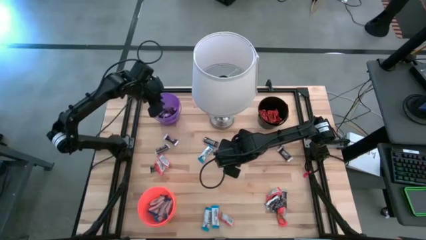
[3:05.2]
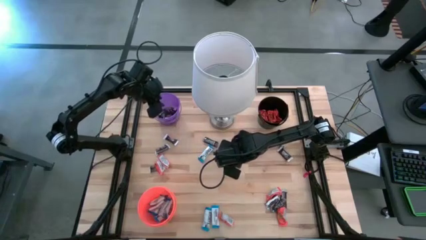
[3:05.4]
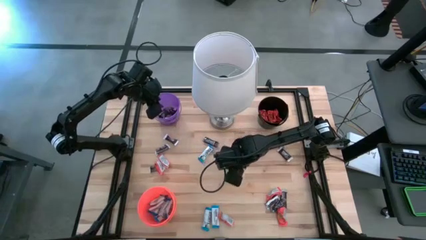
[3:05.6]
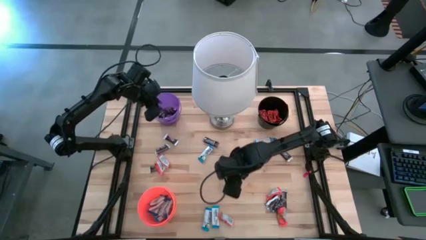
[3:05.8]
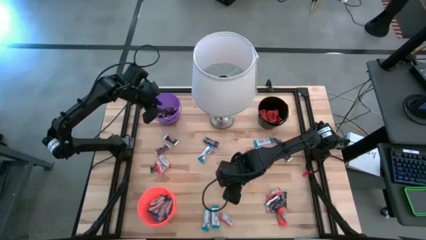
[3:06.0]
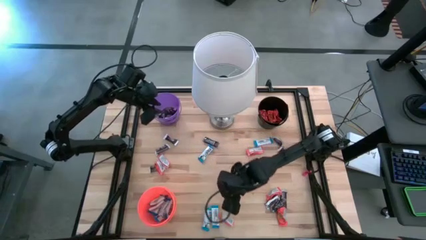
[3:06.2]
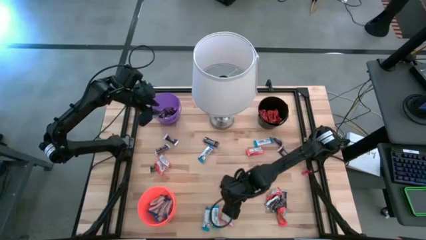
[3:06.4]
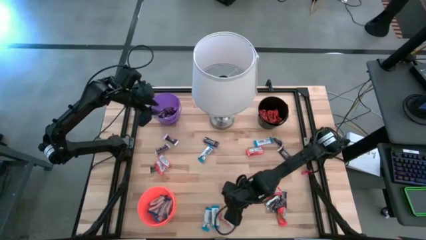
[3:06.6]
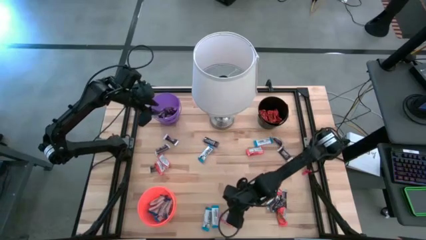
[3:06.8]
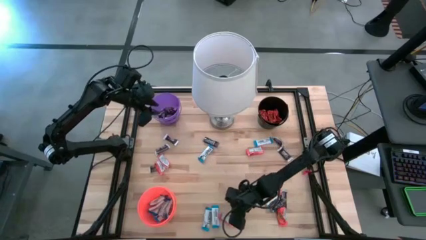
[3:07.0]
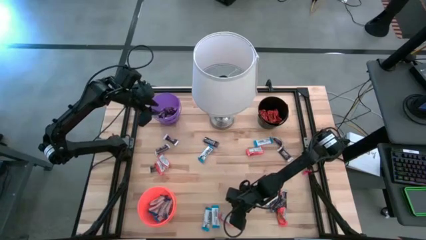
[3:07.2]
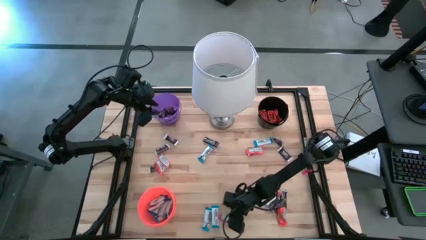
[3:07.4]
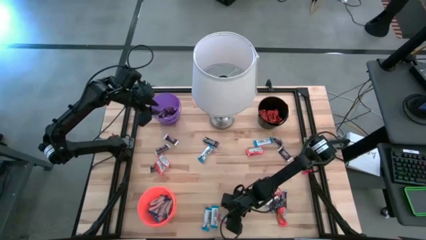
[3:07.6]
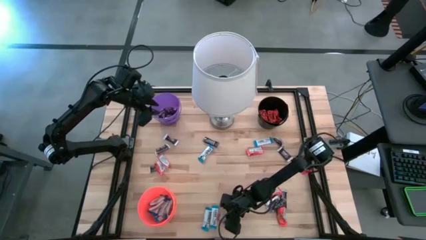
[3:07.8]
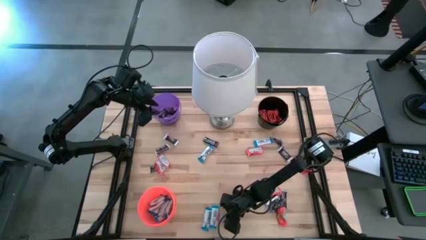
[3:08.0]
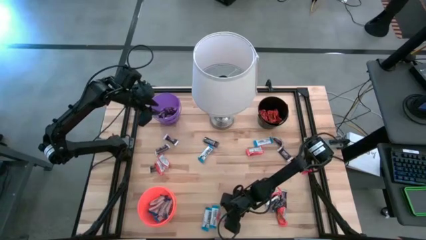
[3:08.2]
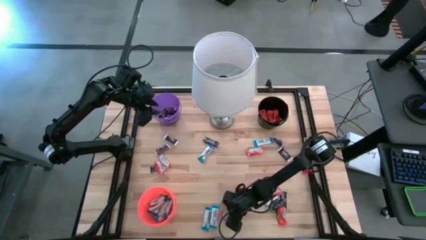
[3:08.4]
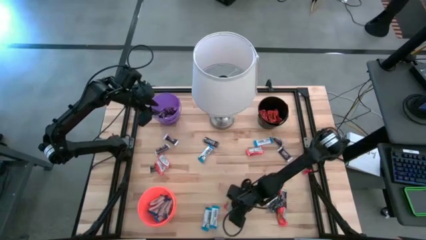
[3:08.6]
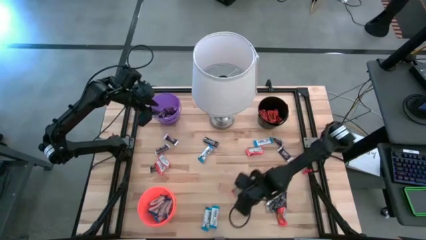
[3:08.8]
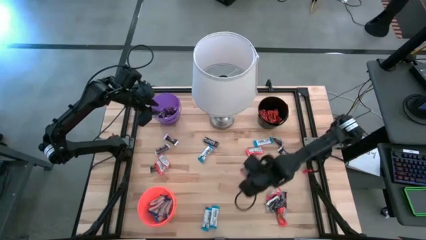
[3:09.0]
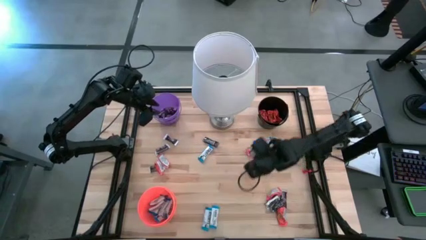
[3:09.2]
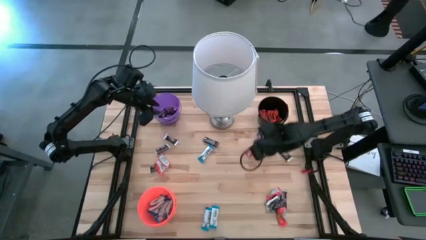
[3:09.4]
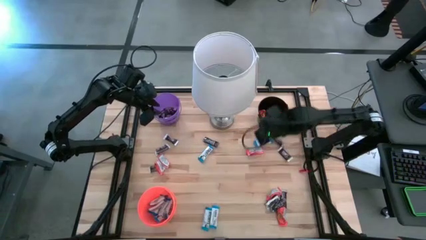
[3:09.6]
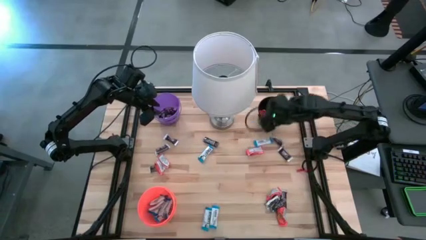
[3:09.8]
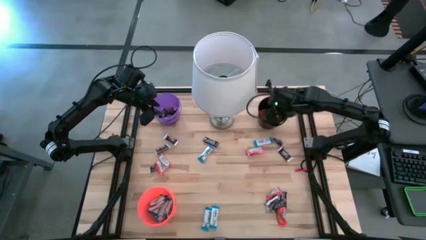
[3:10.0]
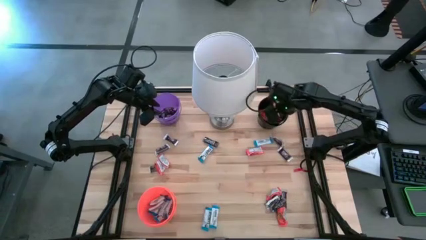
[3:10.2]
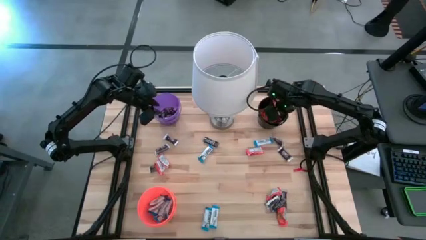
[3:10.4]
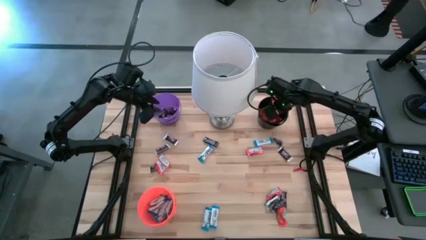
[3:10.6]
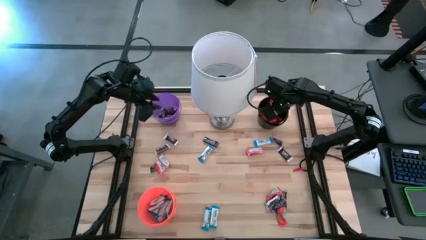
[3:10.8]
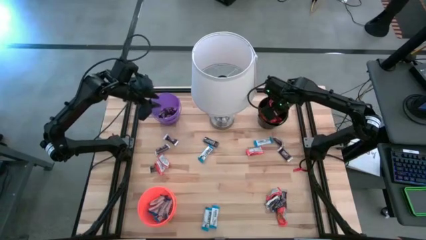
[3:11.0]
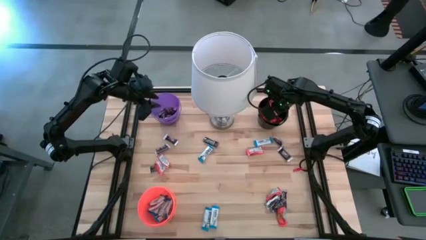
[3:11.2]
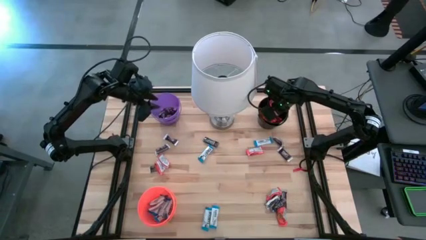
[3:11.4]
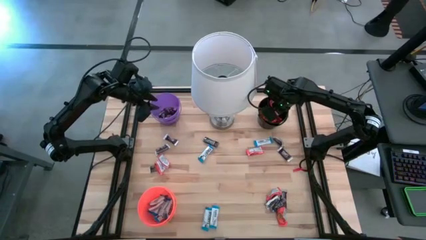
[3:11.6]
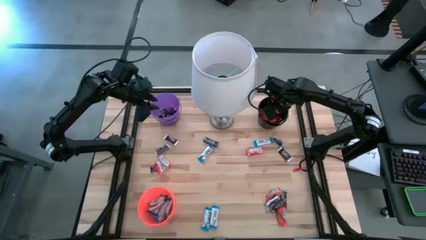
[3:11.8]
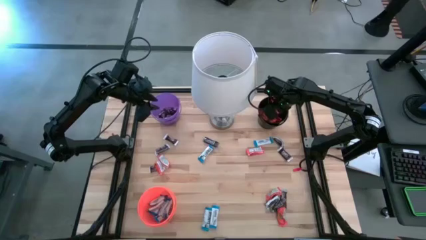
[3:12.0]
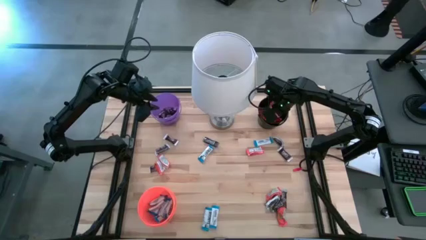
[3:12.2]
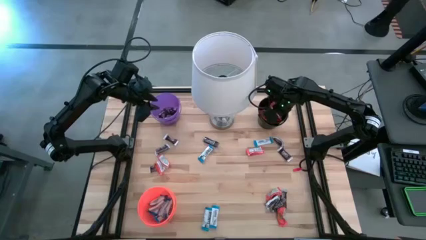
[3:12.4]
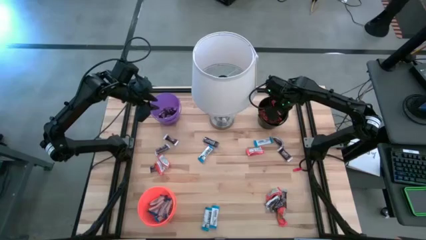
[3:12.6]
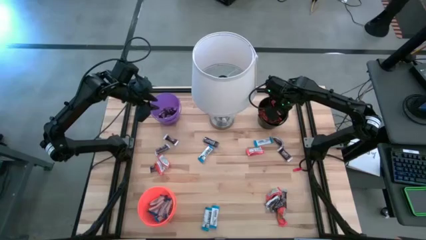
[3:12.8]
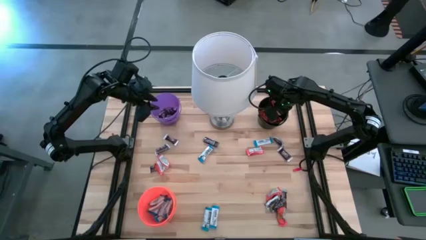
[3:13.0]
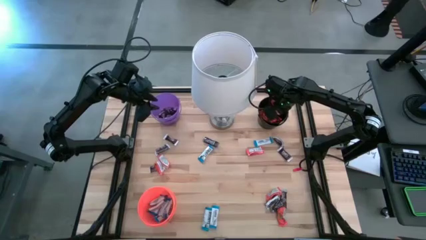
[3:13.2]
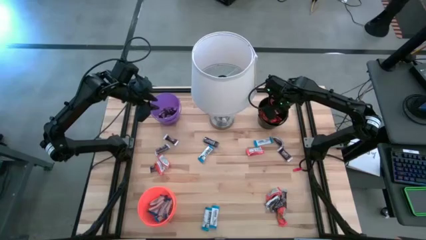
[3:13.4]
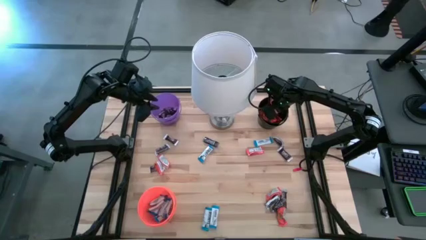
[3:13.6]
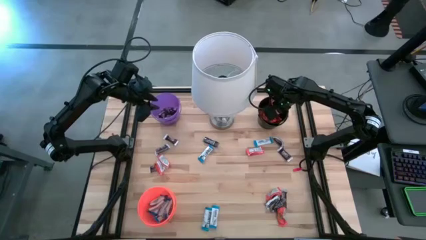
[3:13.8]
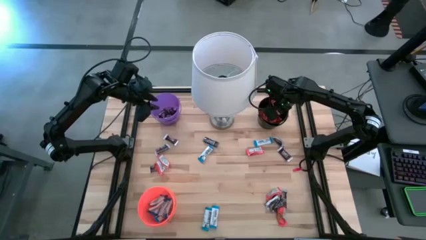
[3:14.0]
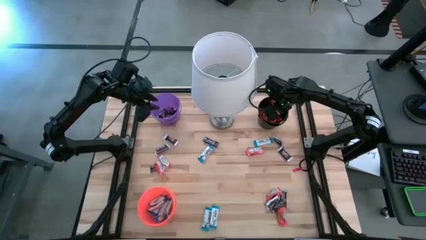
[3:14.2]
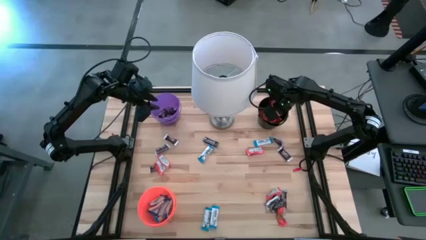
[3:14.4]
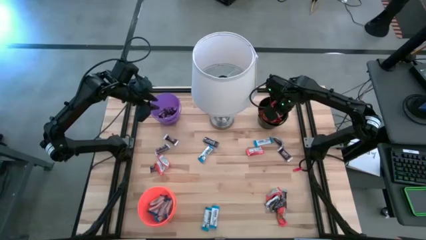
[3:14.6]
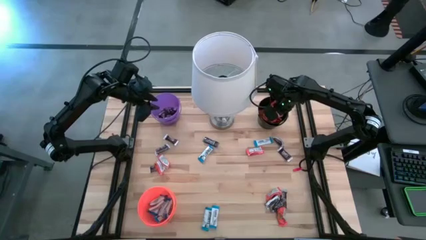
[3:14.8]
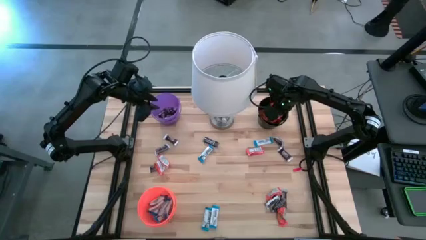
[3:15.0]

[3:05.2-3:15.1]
Task: Organize candy in baskets
Put the orange chocolate bar into the black bucket

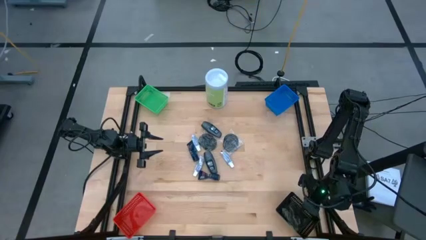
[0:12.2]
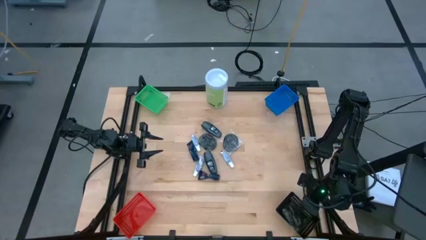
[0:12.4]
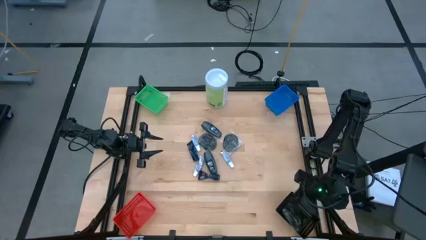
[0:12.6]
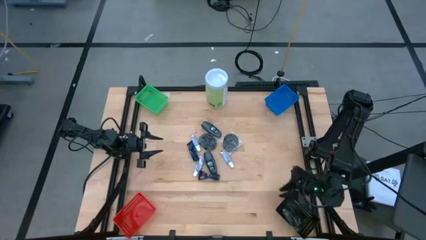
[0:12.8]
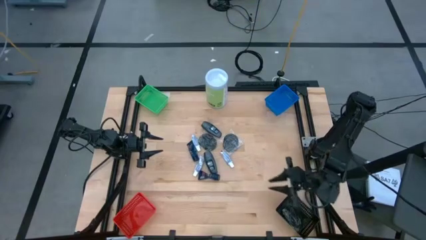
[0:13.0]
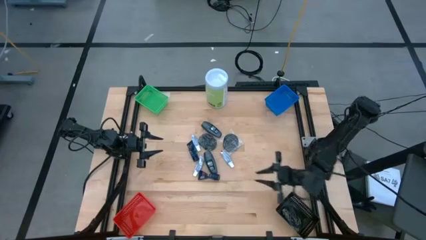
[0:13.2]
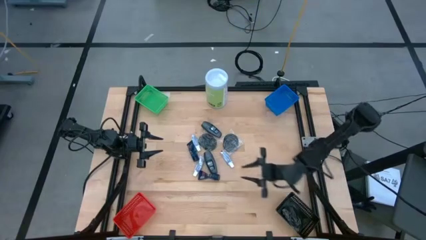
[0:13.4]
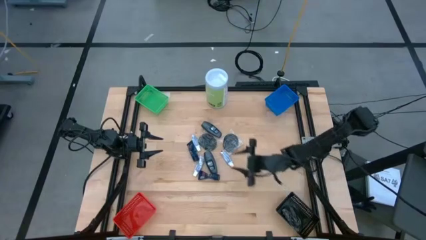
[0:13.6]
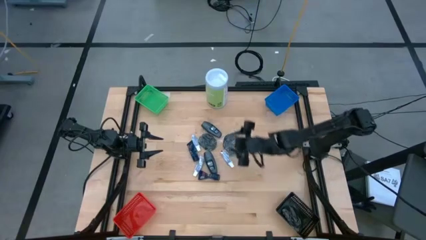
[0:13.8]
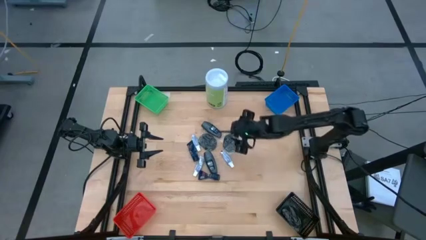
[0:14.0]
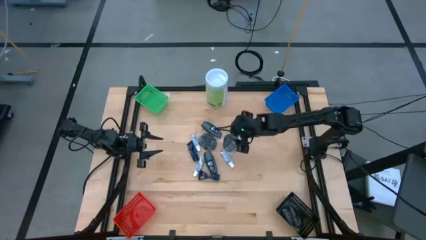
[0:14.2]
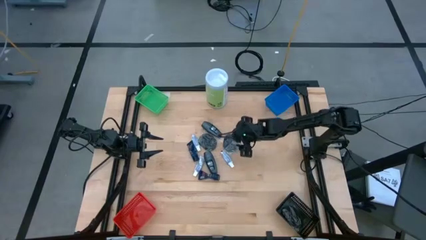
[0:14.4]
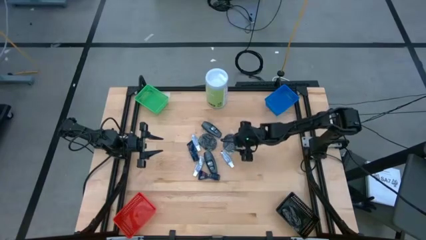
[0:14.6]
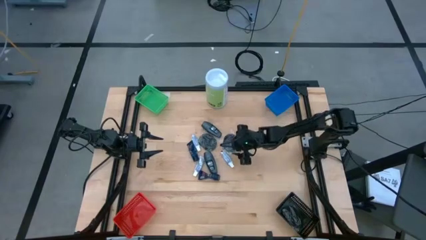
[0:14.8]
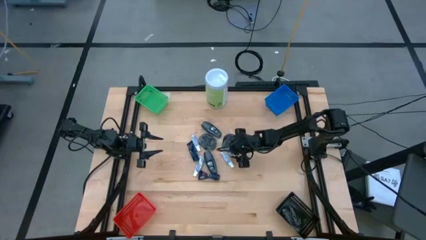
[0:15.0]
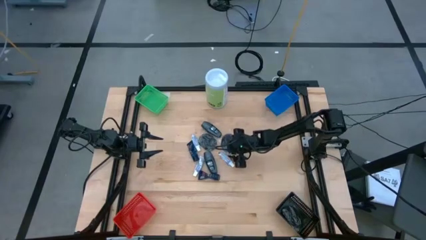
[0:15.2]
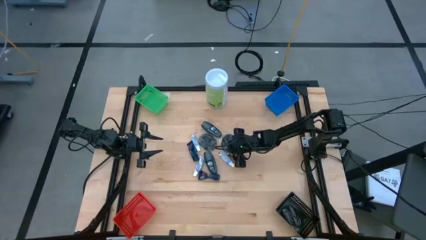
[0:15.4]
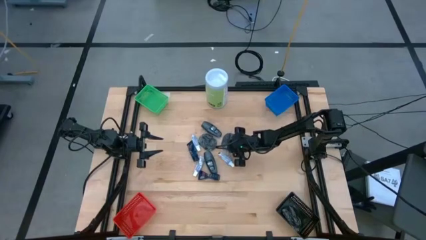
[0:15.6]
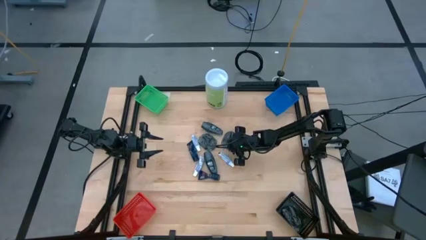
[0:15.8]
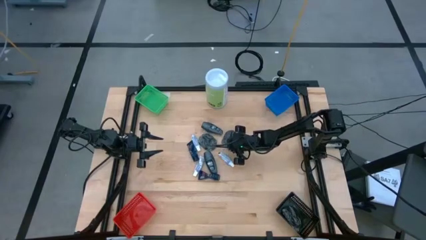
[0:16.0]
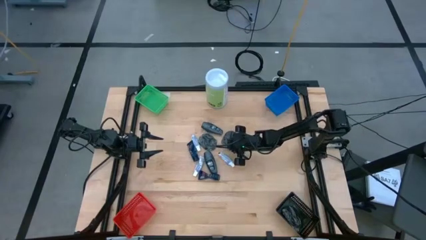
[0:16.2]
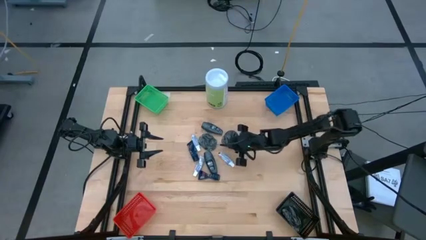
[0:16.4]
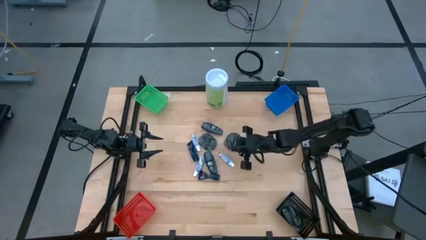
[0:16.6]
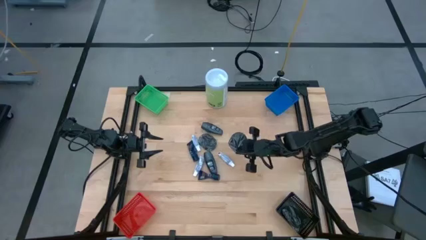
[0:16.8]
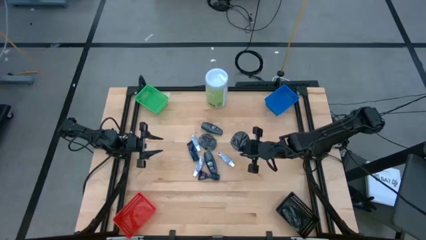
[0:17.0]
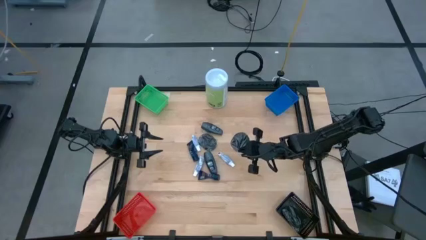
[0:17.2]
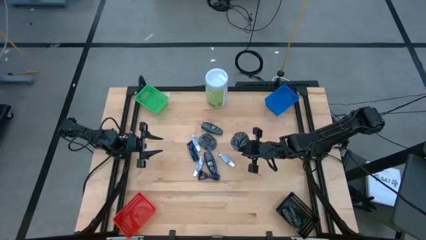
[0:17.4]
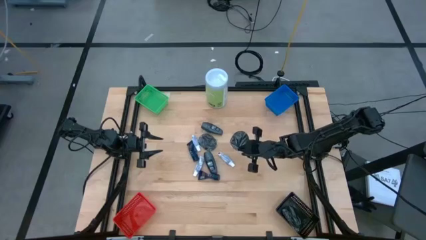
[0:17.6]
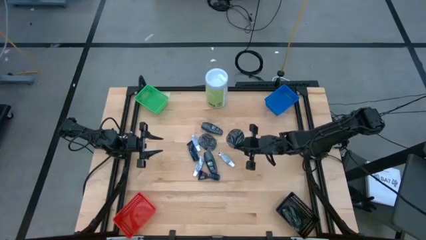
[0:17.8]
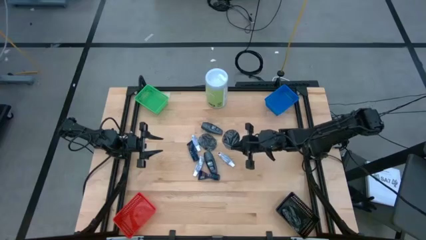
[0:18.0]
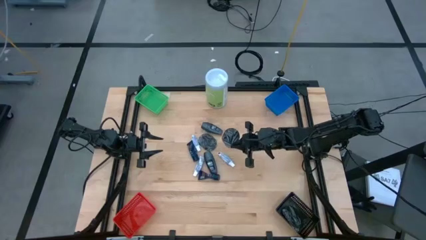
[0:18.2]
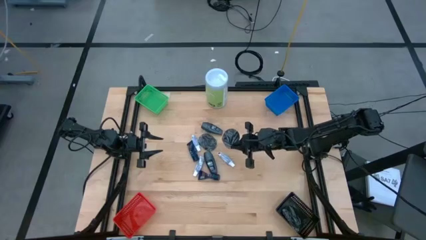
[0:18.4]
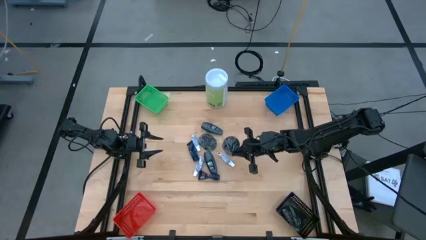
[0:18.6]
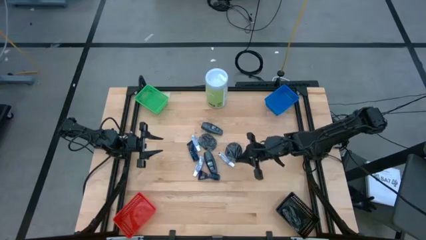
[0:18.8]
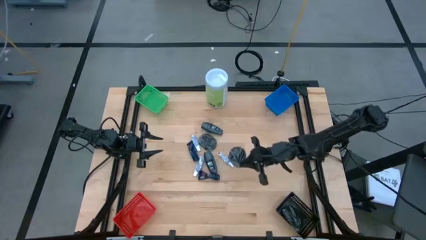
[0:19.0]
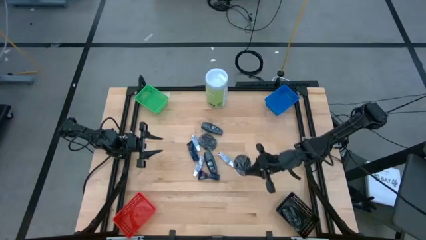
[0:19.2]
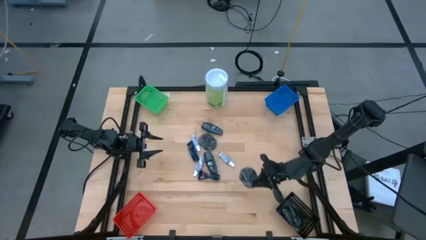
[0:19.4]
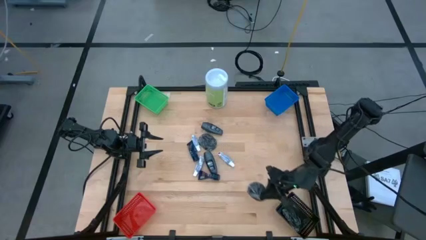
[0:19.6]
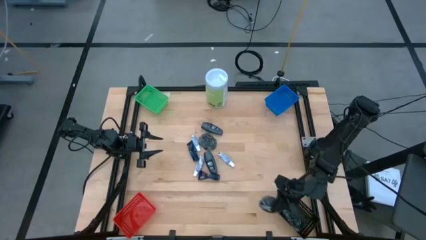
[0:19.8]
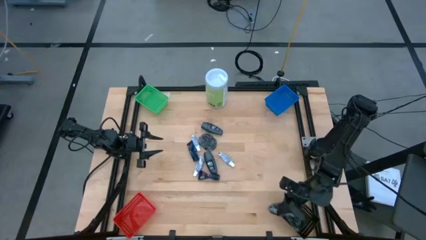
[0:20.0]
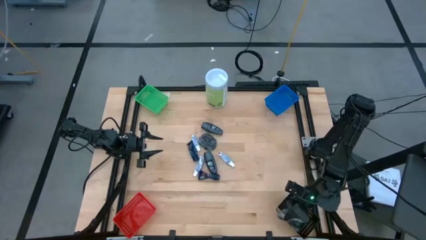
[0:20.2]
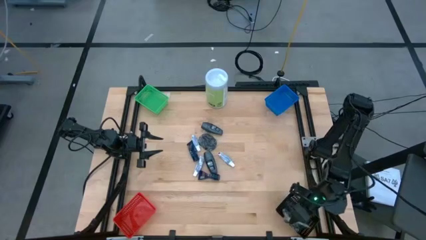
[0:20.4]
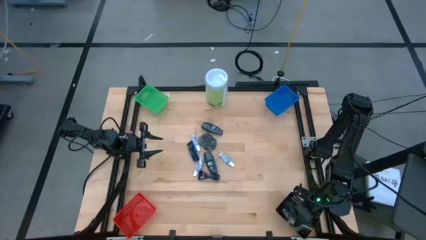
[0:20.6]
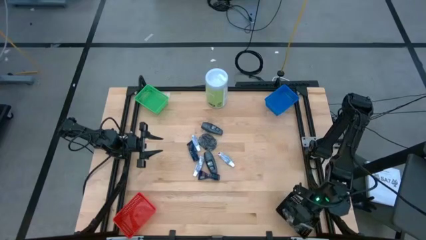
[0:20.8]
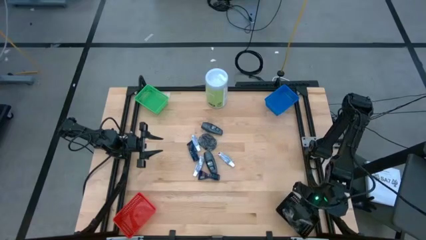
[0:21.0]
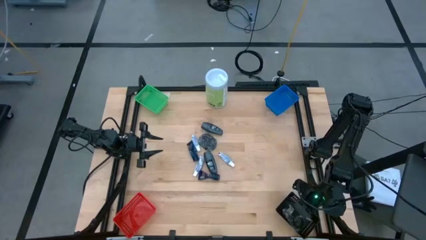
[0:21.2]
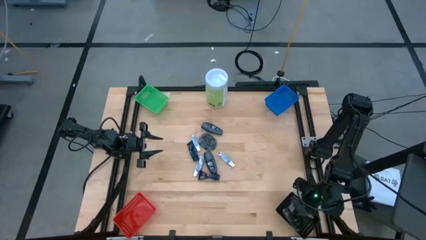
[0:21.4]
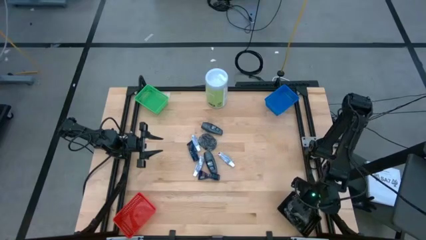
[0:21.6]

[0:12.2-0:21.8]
Task: Pick & Place Travel size toiletries
Put the right black hairbrush into the black bin
